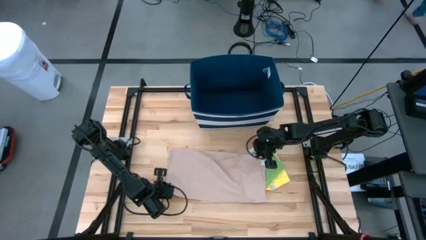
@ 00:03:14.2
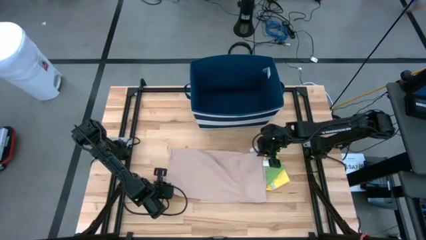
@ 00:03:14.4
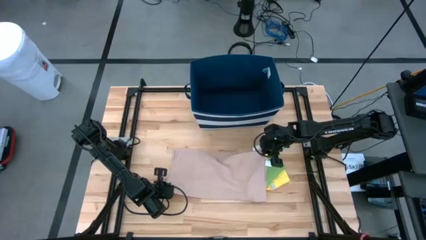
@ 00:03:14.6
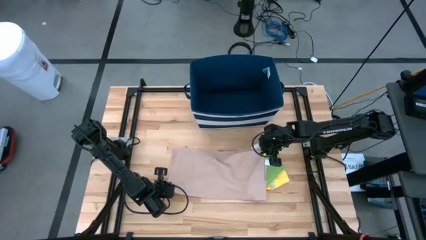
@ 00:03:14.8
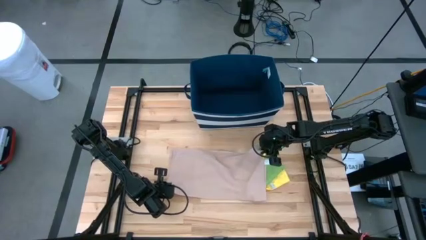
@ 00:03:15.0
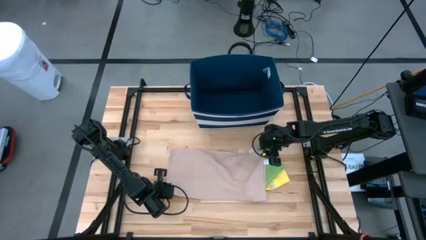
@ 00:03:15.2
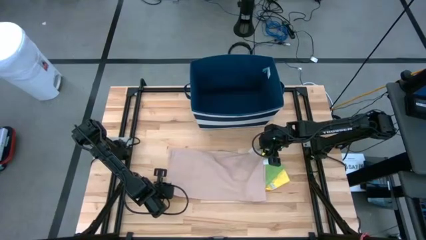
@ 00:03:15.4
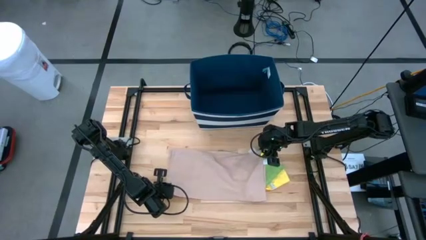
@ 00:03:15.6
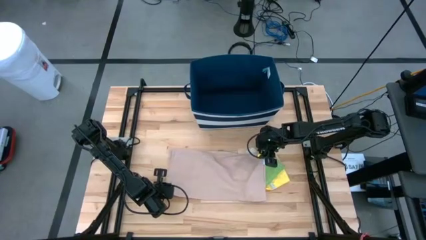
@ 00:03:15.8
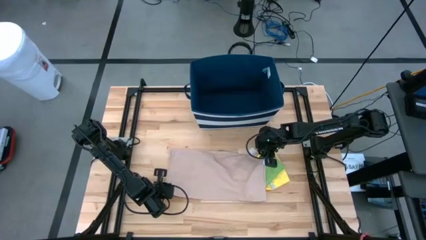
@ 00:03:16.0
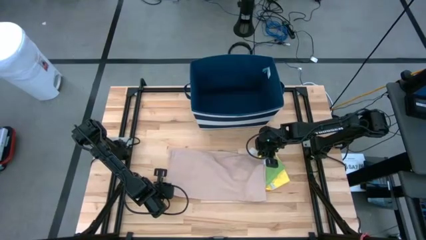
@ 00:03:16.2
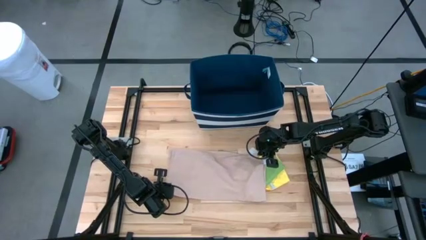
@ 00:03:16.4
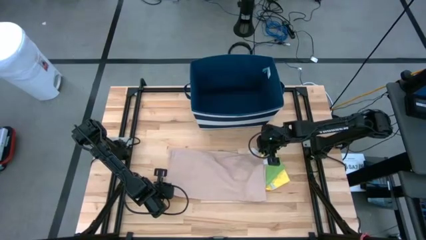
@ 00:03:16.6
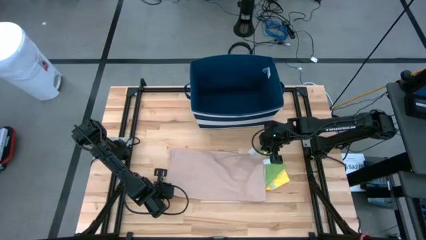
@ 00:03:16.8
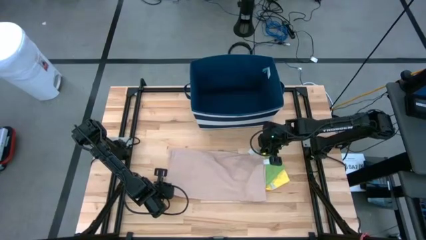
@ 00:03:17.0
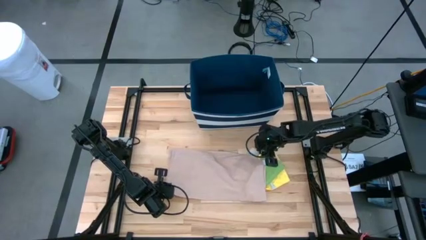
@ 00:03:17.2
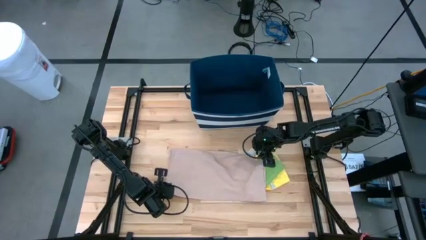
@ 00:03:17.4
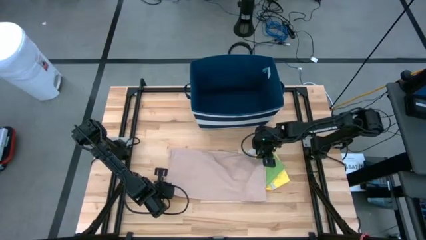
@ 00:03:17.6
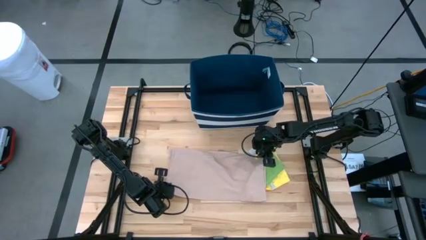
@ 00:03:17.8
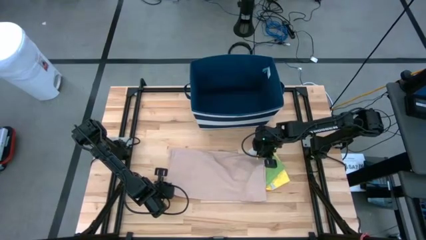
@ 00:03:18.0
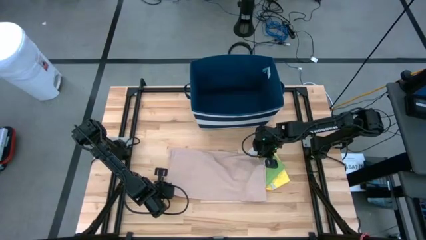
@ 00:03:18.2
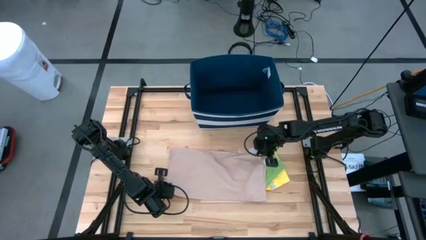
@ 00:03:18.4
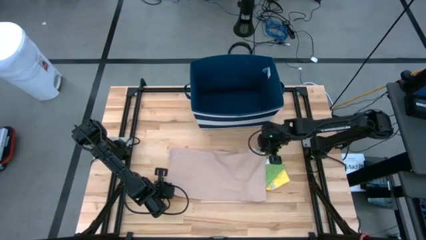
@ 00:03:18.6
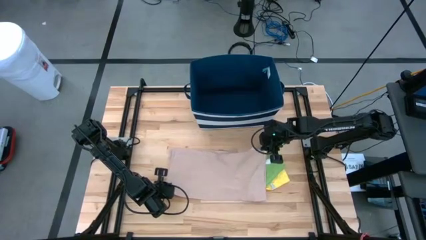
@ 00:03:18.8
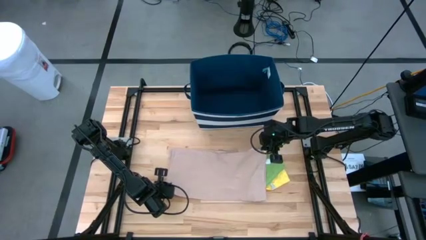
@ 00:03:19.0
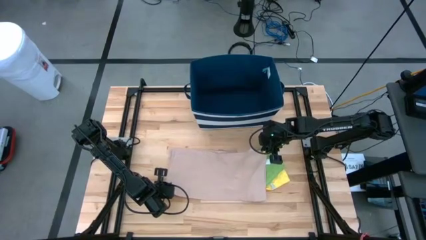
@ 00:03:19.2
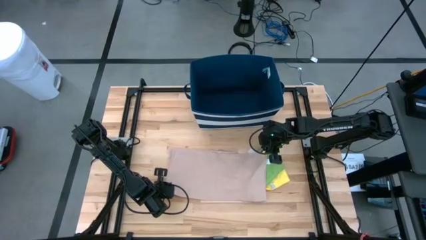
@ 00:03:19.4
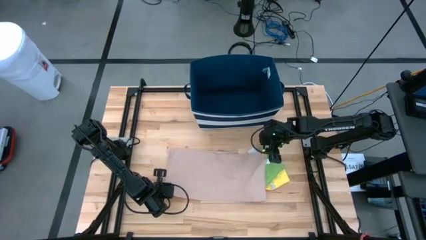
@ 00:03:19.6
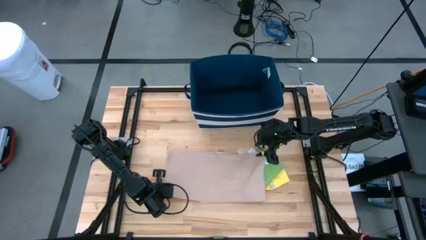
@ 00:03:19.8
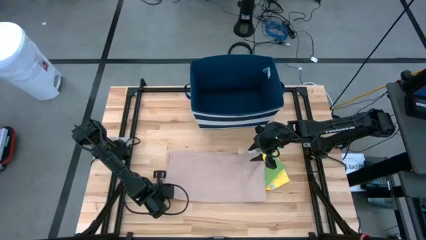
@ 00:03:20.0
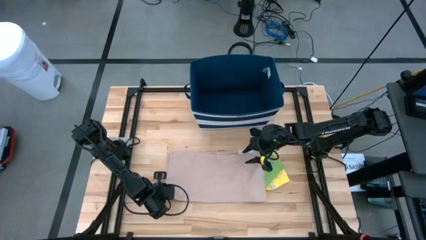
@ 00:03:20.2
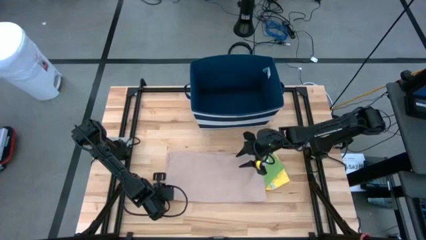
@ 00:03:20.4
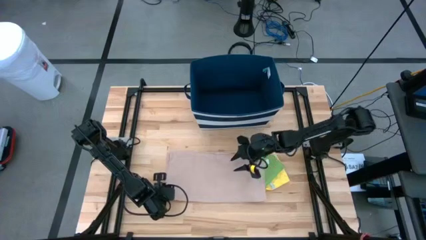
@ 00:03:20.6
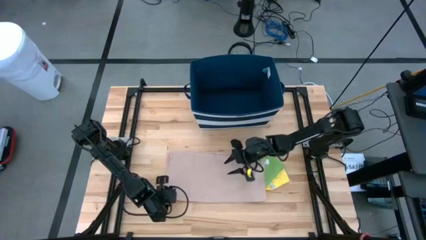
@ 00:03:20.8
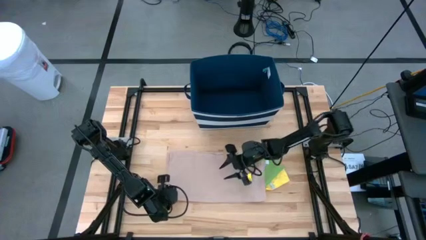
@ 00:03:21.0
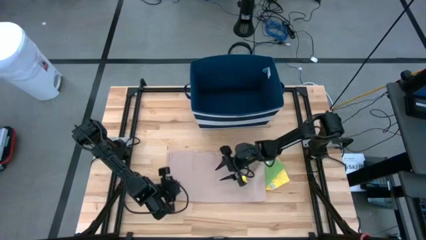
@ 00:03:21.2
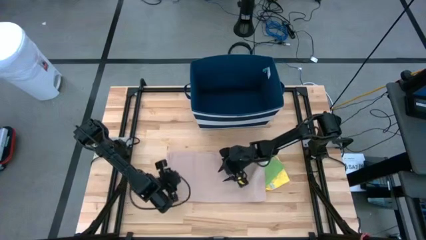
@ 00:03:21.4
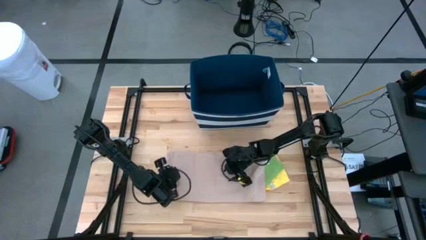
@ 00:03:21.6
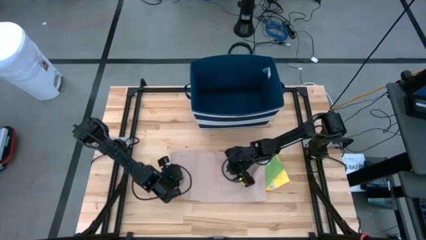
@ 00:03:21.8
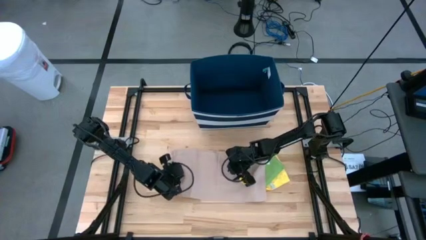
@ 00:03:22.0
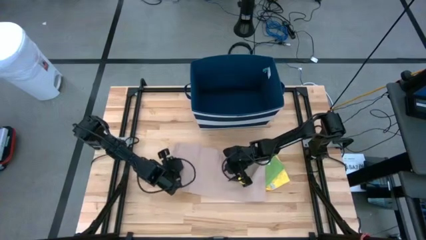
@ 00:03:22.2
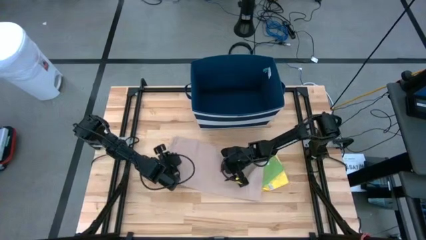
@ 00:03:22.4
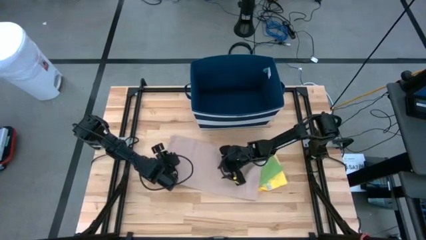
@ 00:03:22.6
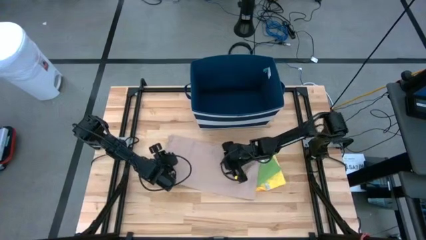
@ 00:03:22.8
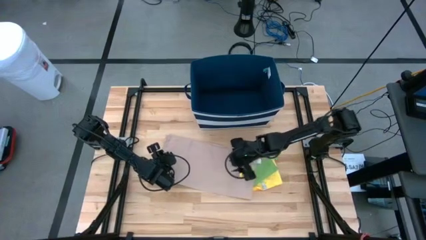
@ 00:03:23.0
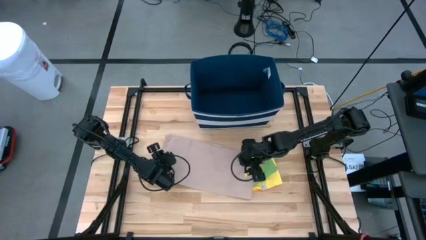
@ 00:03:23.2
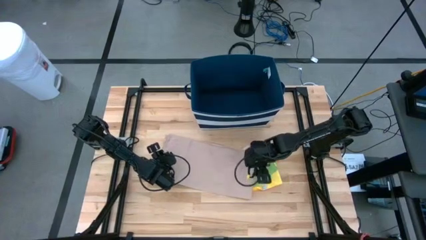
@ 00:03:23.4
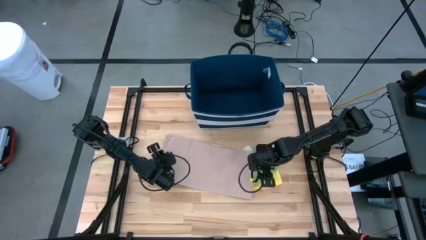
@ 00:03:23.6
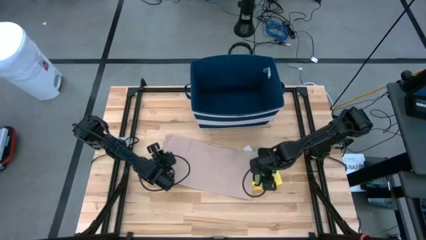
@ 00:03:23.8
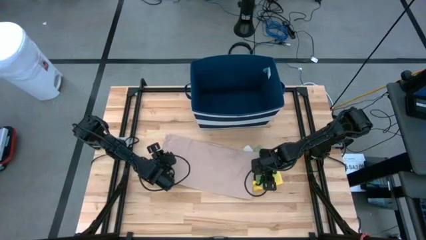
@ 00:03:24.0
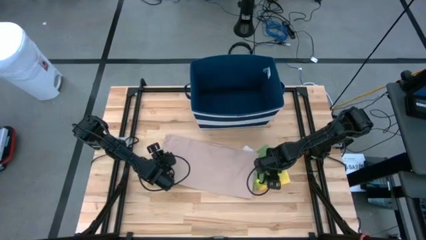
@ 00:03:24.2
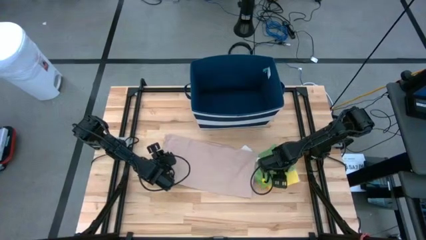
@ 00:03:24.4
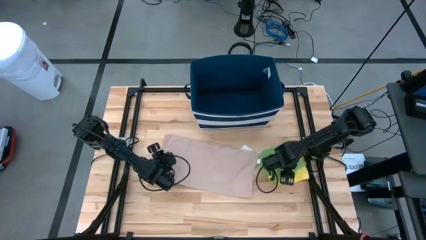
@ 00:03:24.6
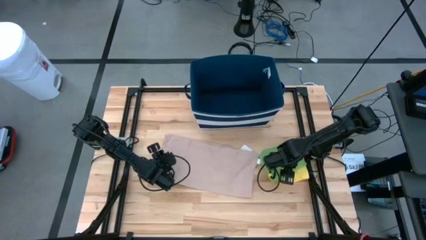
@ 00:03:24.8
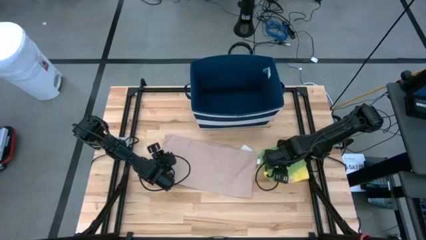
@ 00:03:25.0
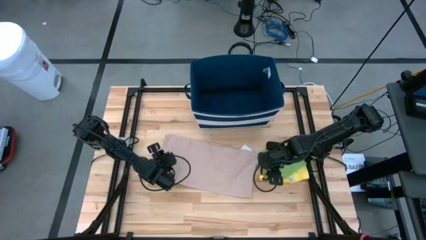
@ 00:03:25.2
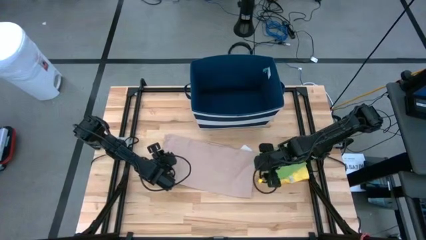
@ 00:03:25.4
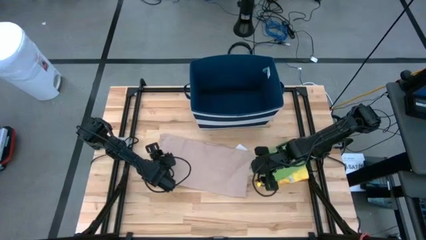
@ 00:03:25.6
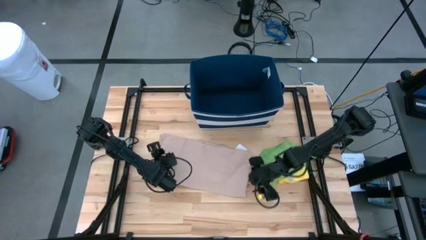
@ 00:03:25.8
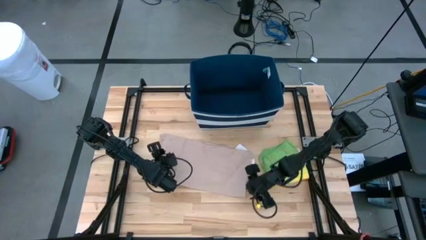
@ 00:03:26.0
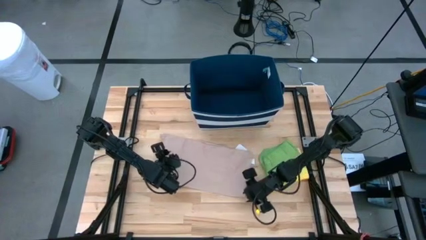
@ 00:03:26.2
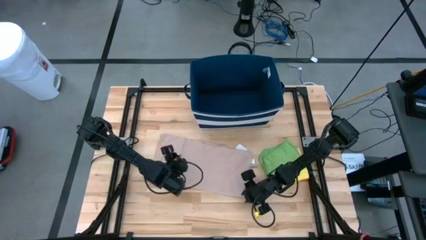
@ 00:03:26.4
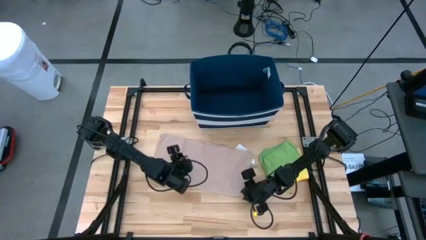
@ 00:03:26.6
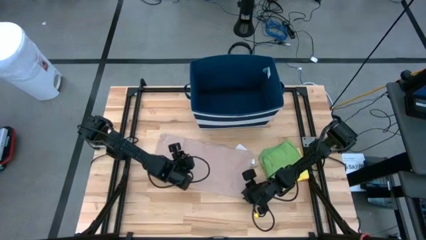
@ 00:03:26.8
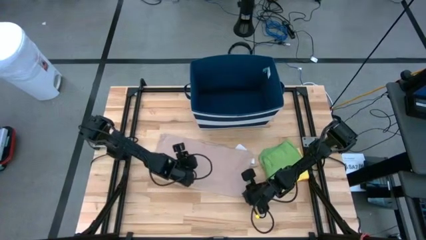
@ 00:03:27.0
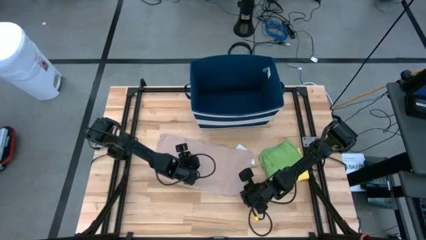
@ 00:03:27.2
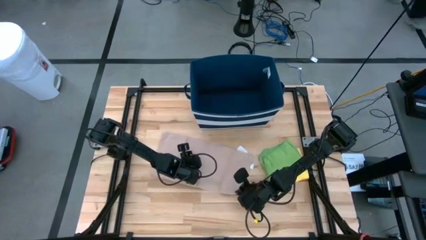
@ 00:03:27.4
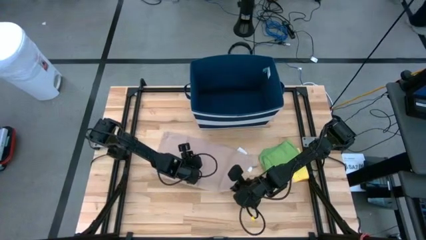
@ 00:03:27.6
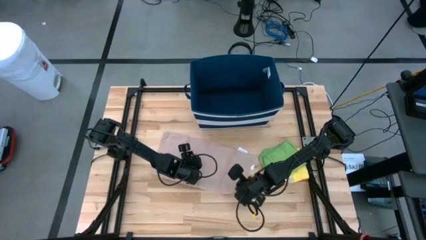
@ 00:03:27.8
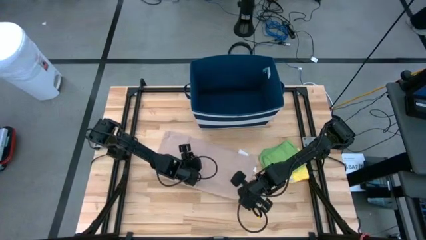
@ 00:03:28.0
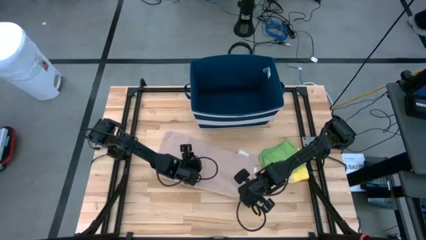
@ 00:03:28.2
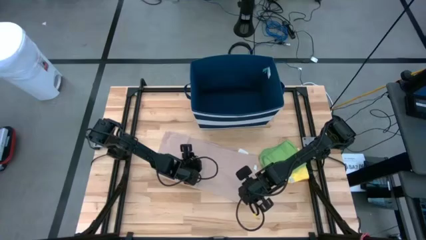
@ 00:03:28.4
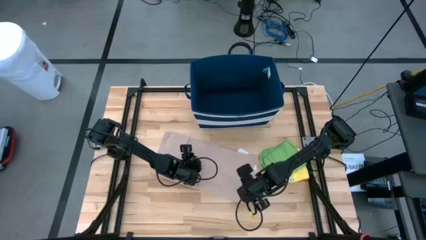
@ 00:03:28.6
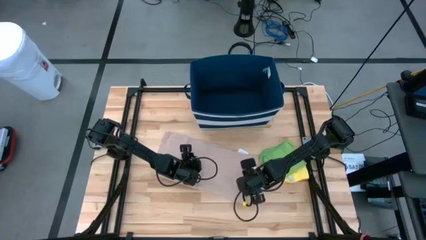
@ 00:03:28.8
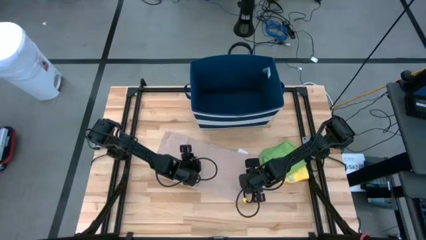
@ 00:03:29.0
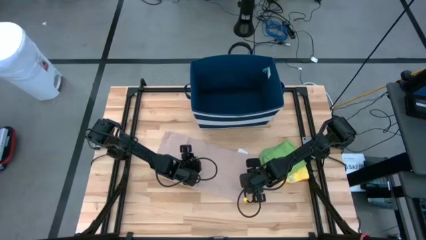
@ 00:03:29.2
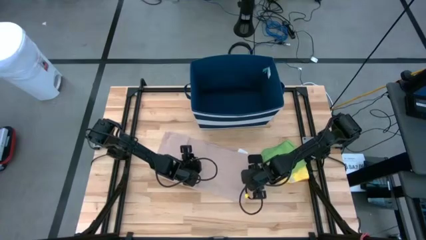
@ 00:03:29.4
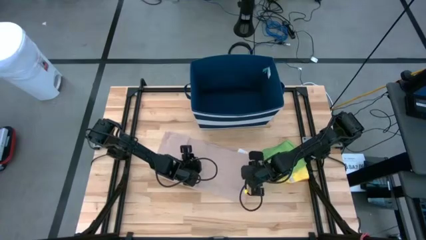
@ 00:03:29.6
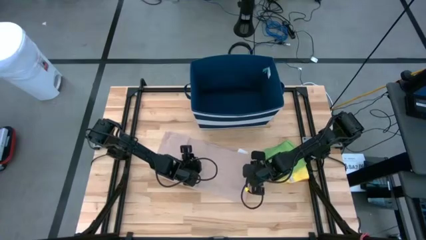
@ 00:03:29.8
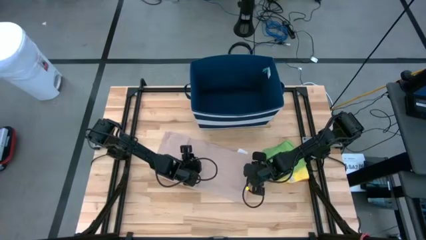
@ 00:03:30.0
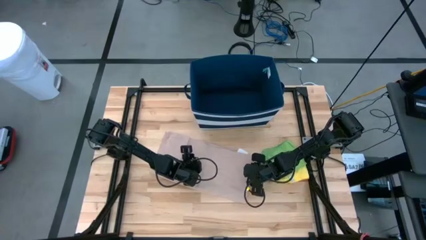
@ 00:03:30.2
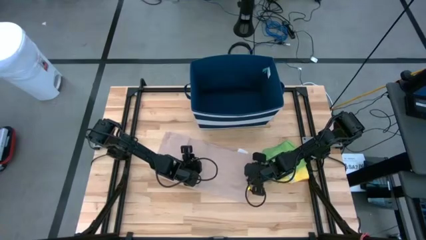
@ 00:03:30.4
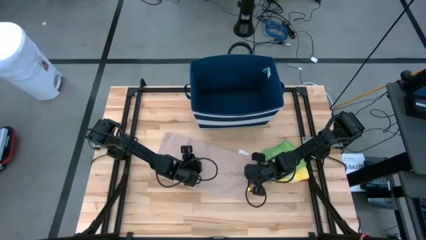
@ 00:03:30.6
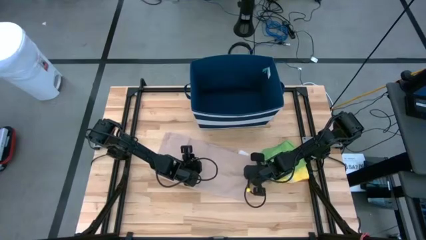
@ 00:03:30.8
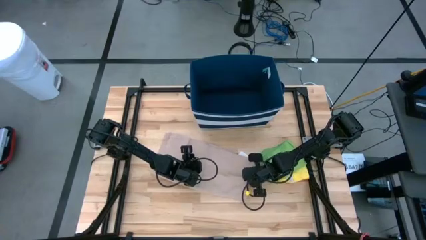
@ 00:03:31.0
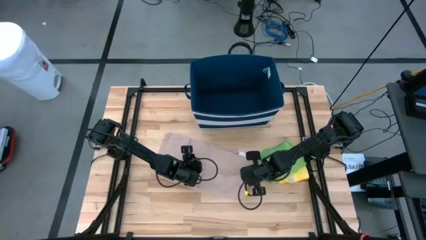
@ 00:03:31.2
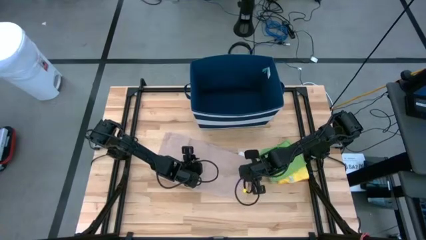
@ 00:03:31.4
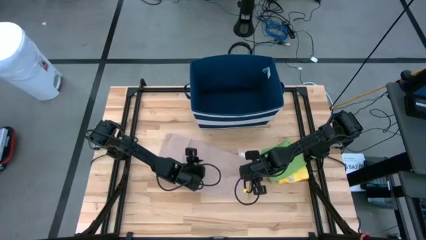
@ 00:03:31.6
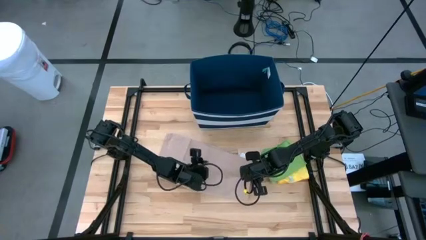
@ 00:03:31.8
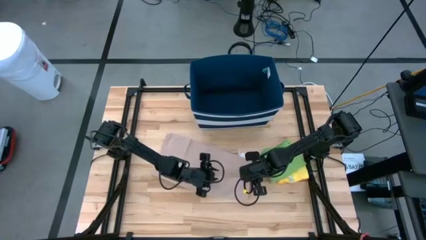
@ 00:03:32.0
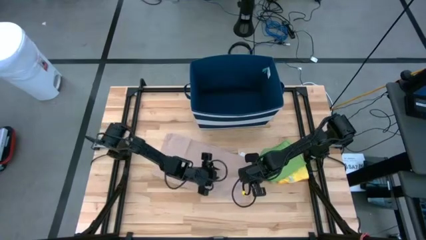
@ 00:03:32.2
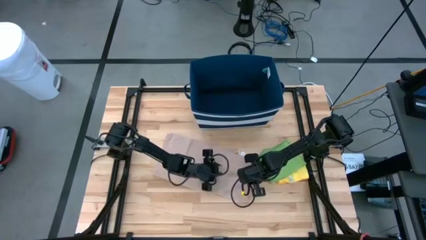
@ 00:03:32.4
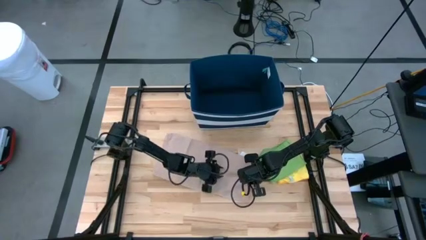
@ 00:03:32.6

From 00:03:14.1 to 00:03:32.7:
Task: Fold towel
Fold the light brown towel
